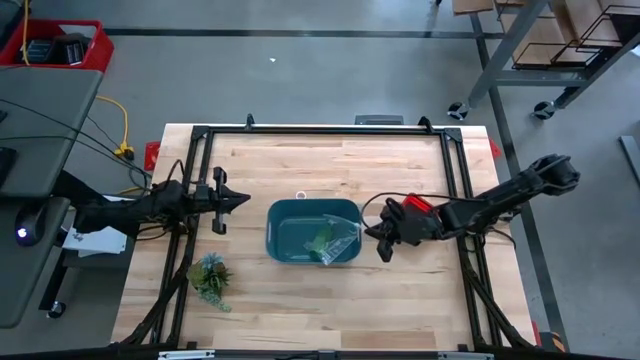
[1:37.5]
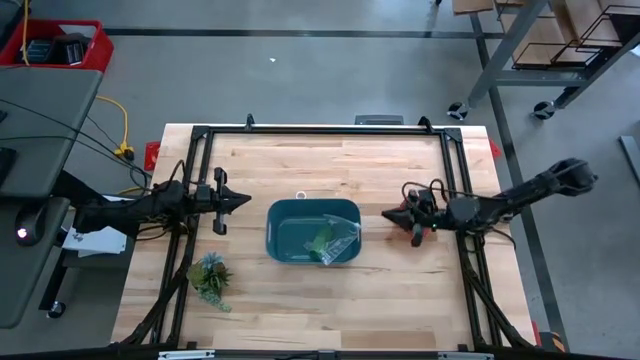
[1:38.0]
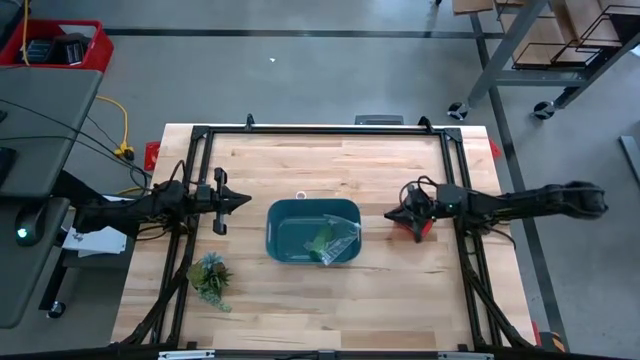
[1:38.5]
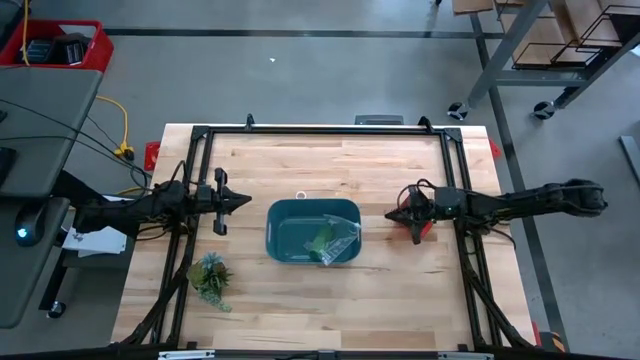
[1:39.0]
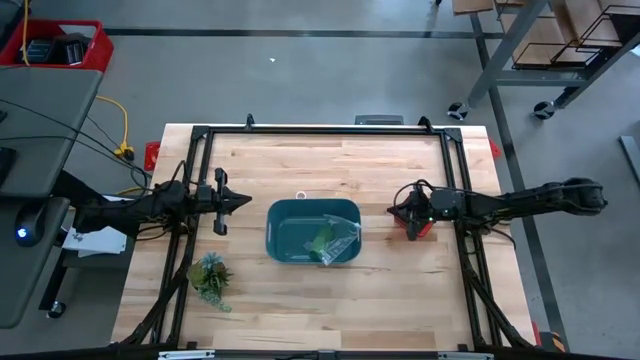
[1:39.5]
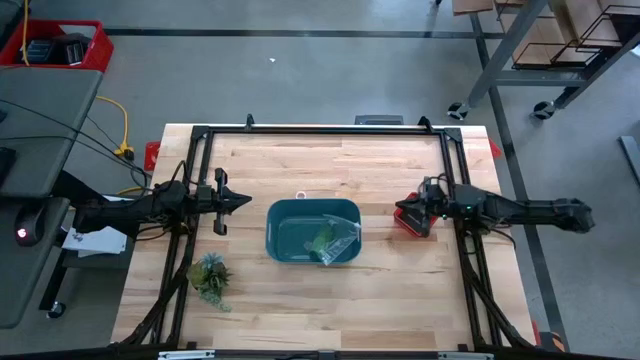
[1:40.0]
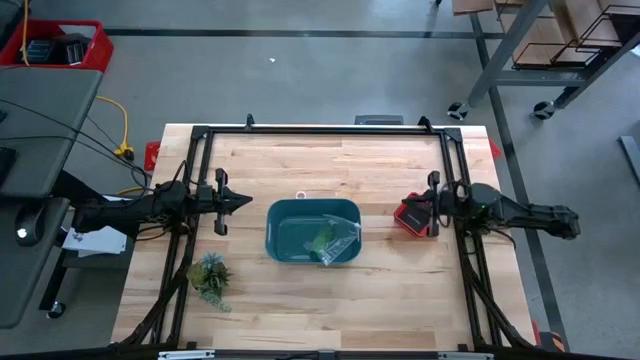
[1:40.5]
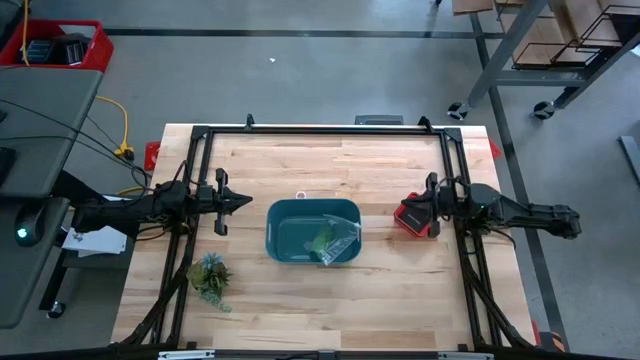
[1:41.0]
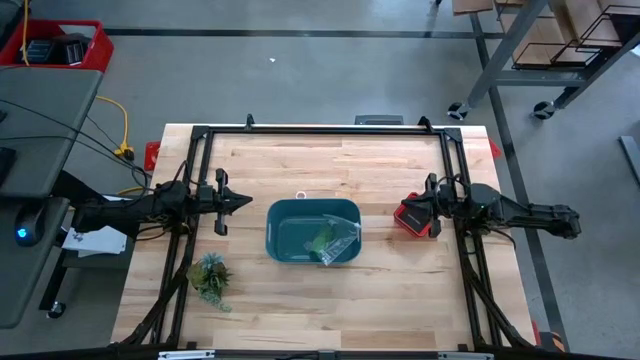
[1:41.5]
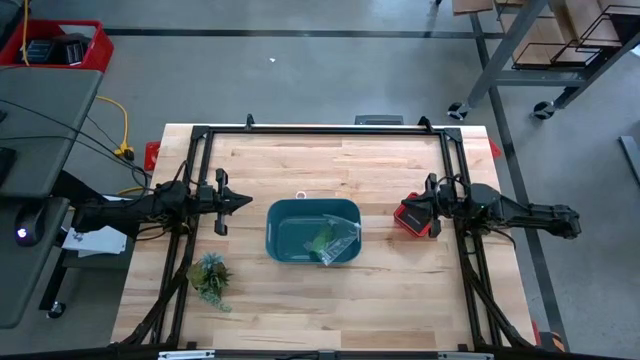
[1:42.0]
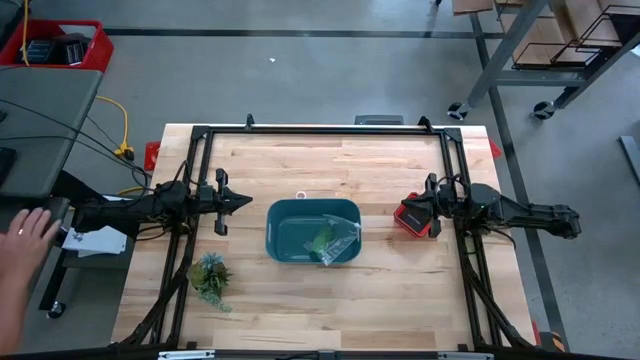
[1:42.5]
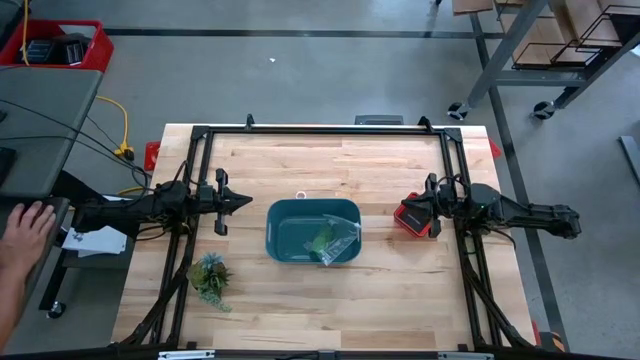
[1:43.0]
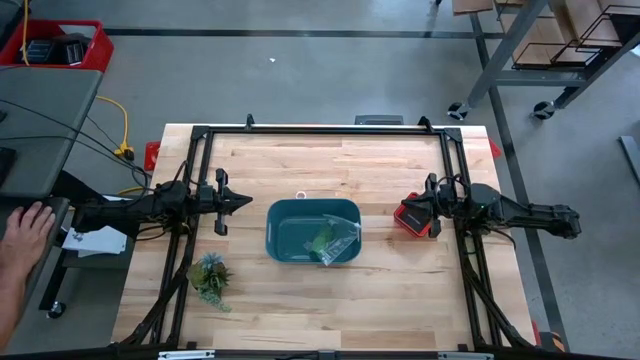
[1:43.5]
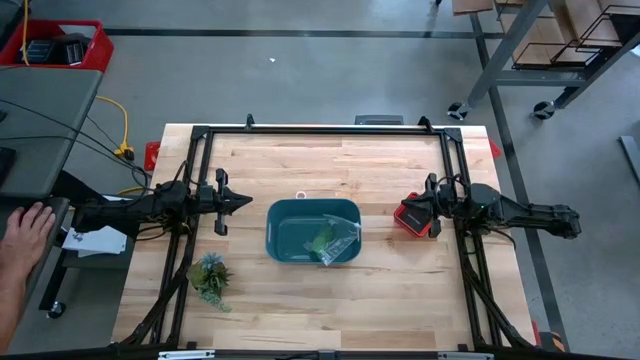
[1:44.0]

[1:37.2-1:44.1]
Task: Roll bandage
Return to Home Position

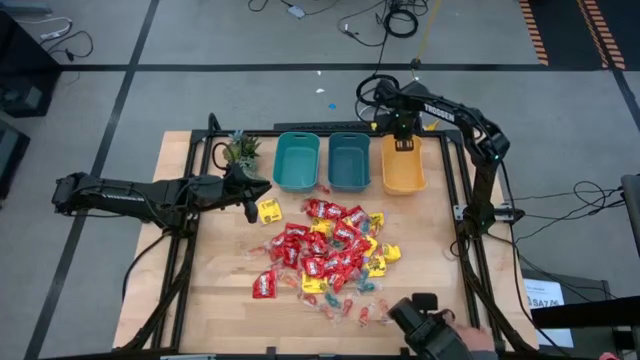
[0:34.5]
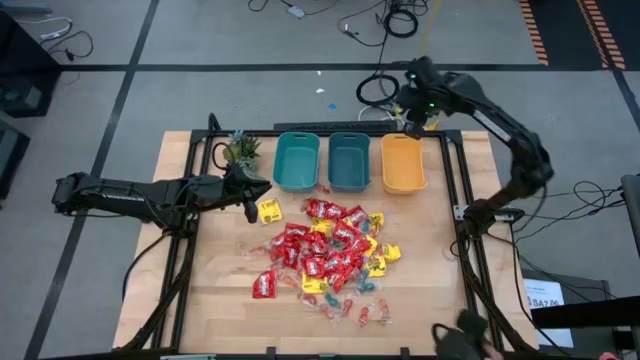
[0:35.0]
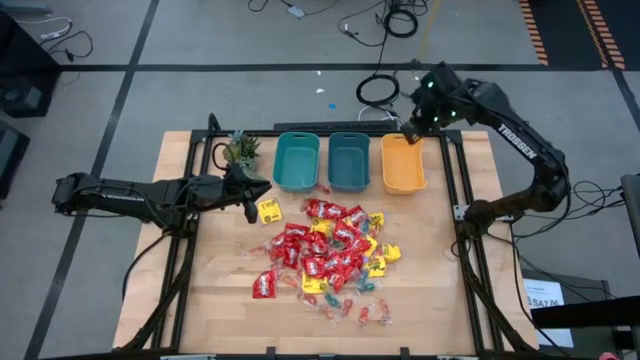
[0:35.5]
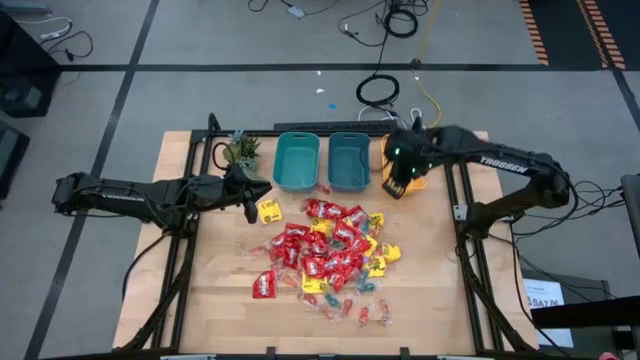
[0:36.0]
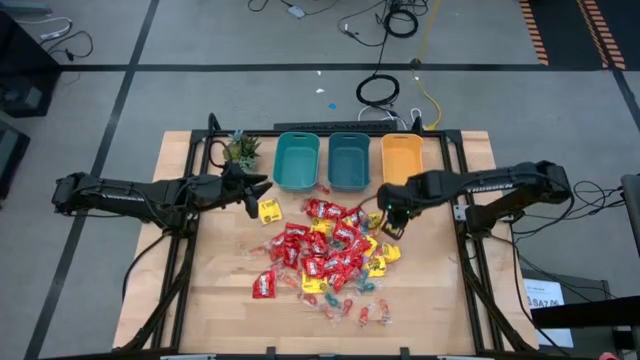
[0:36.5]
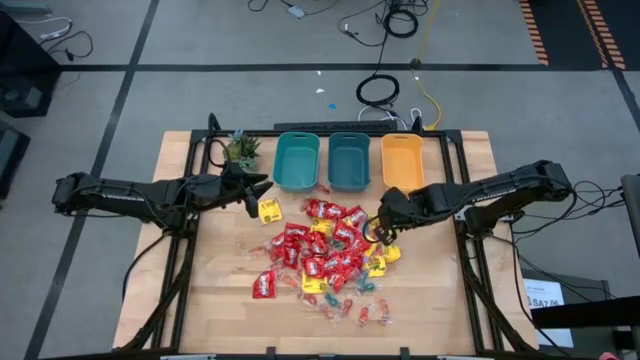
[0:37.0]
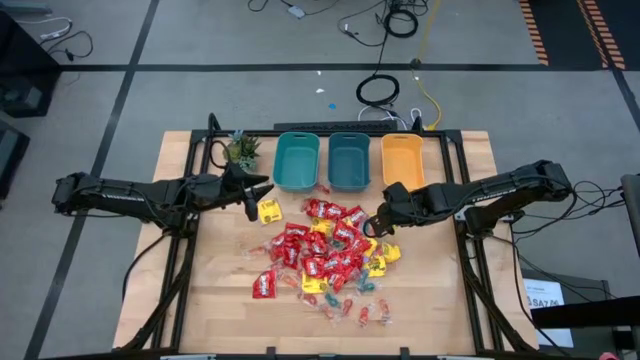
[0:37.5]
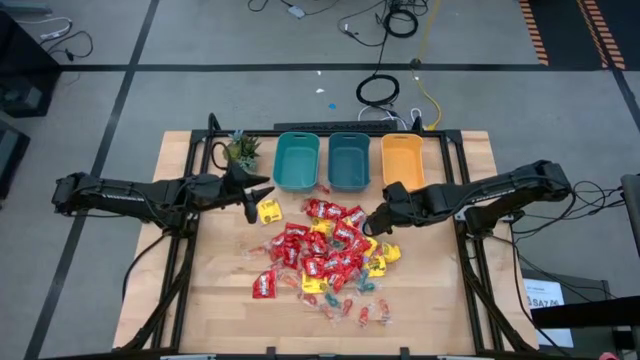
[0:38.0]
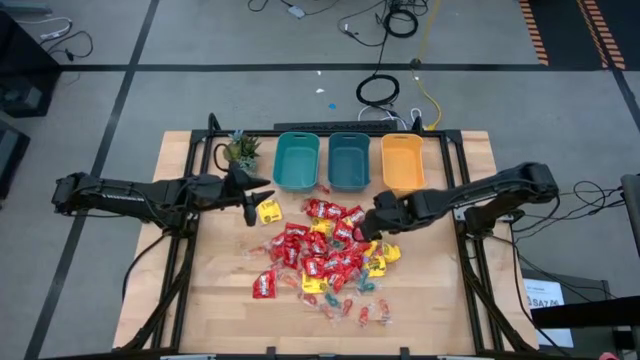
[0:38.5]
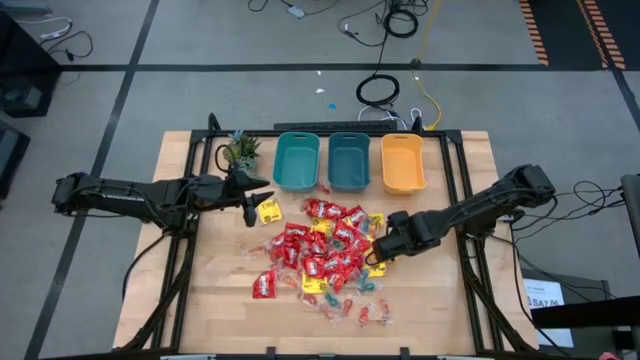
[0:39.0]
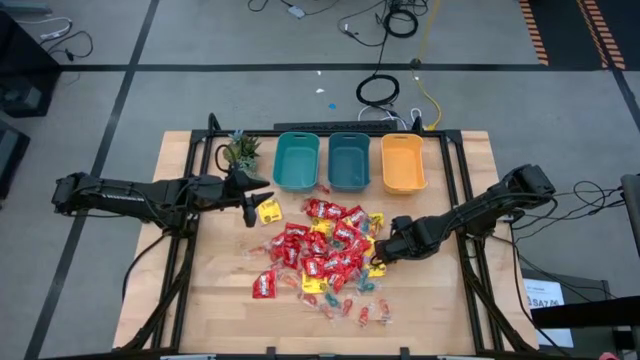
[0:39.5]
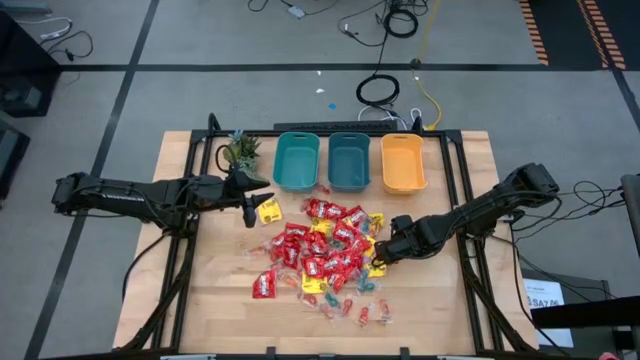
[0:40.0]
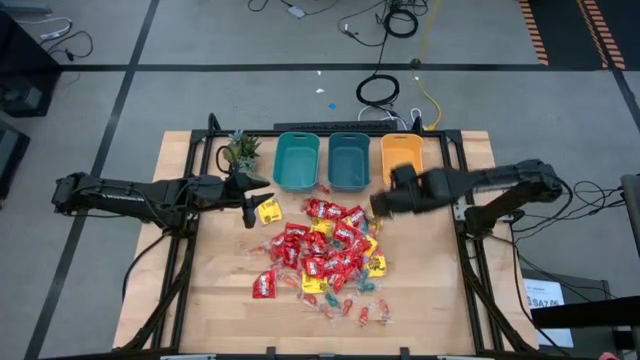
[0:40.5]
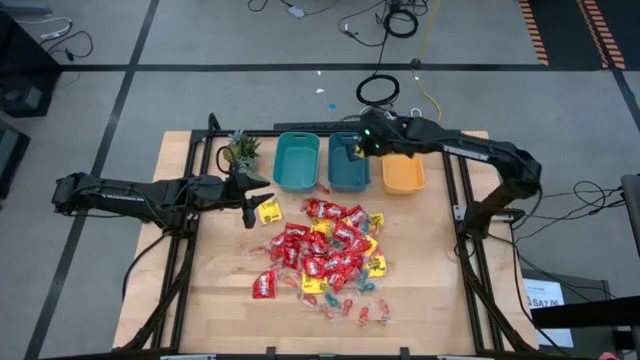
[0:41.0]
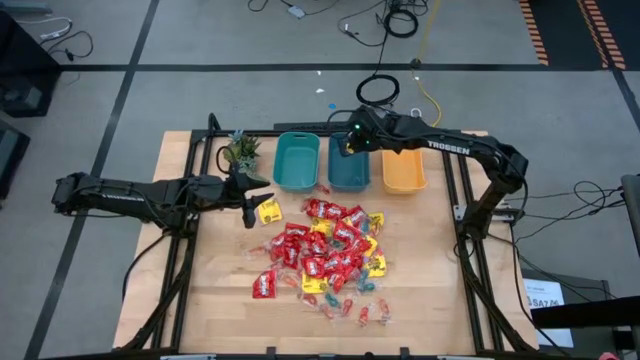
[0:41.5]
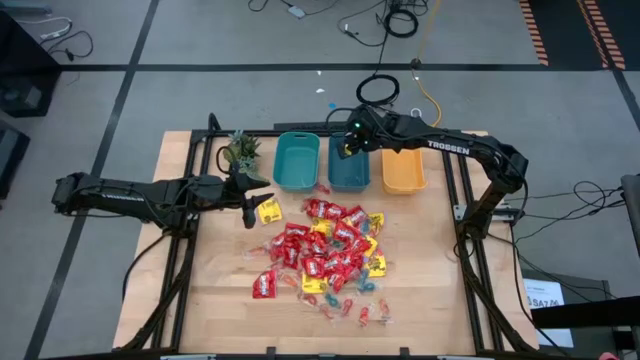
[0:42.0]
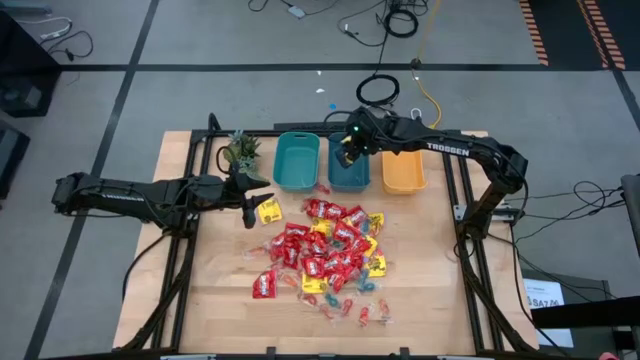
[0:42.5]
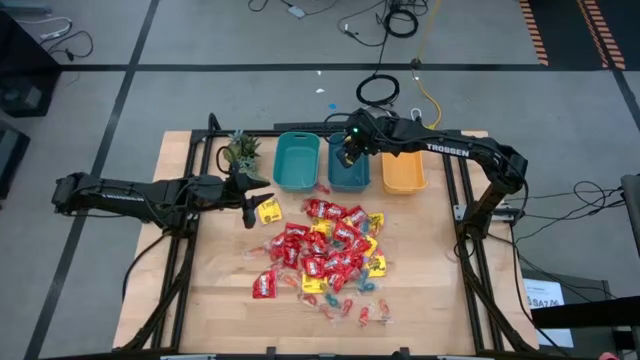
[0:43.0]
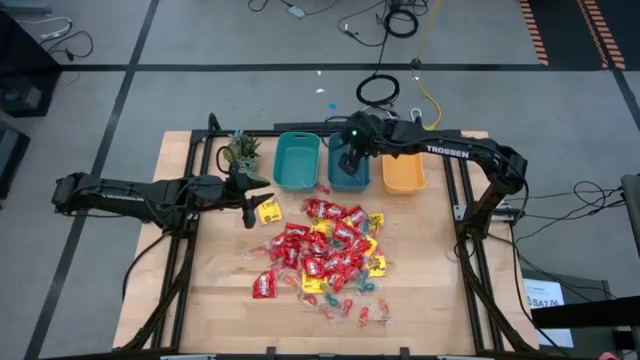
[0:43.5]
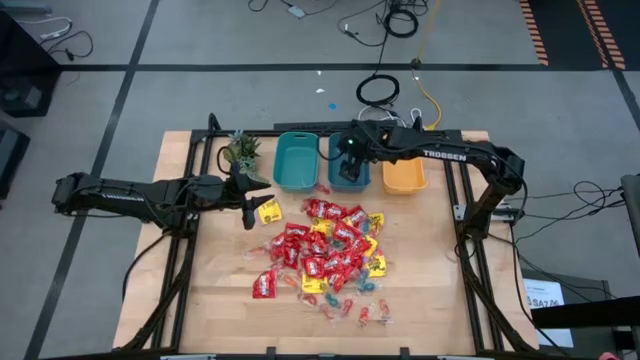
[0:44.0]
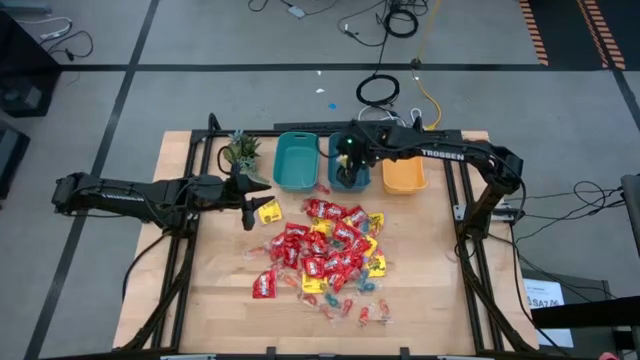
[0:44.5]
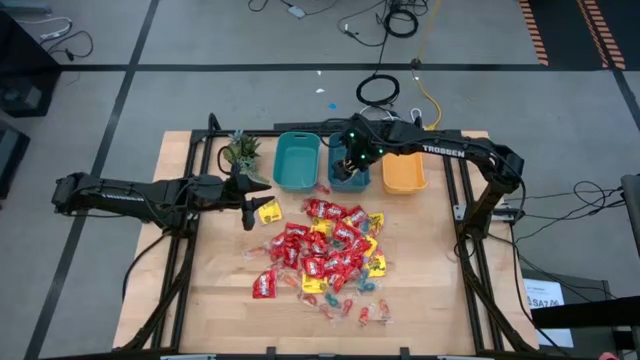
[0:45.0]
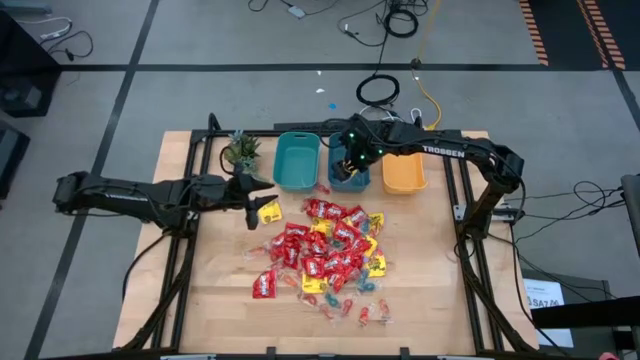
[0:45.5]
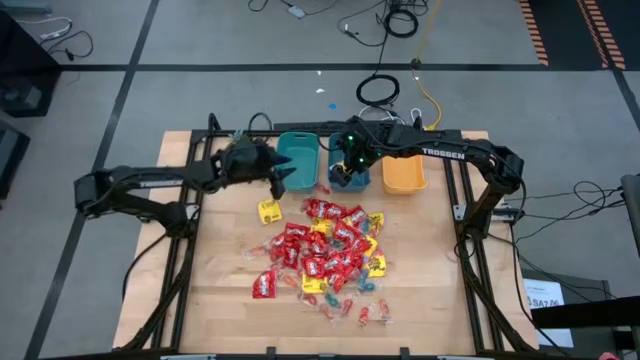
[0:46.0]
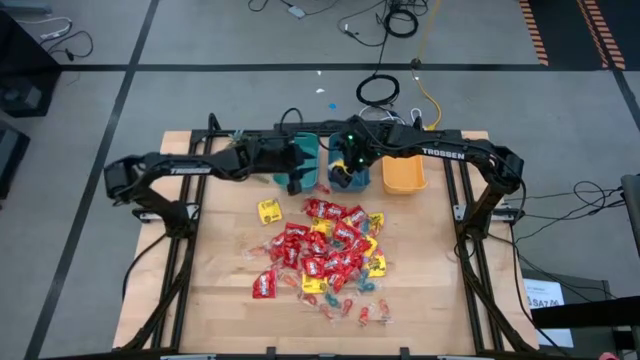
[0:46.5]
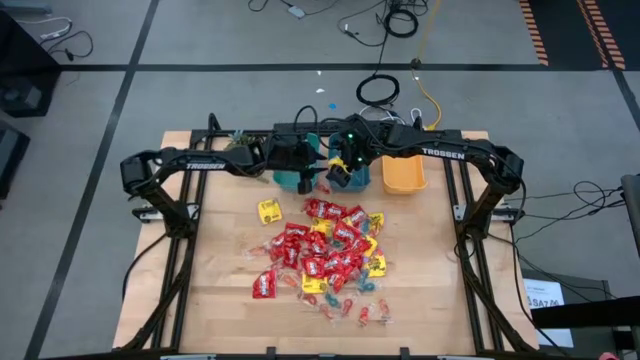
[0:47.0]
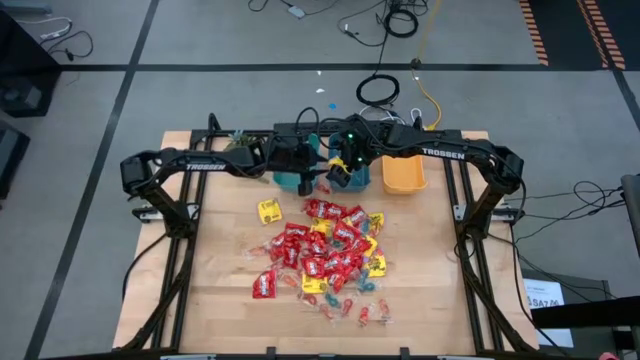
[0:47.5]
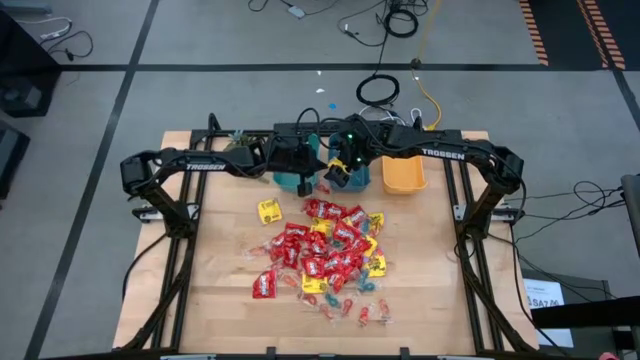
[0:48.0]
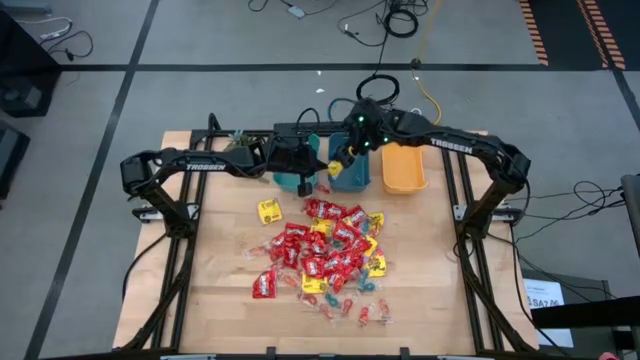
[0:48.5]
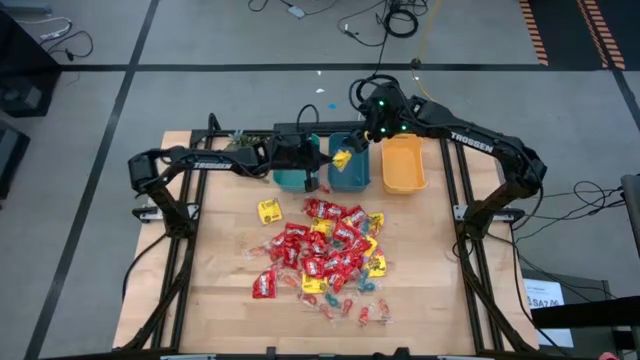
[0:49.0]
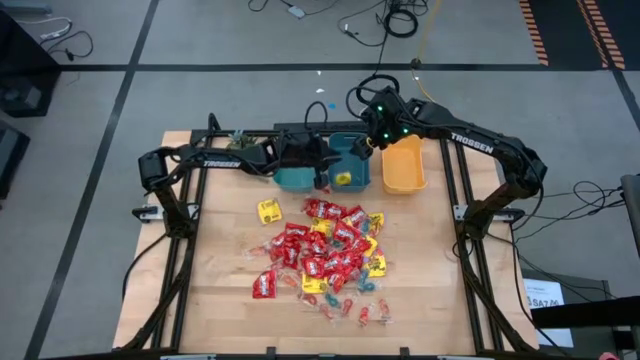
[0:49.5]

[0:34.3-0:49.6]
Task: Sort candy
Put the yellow candy into the blue bin
